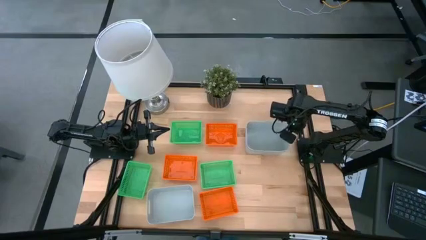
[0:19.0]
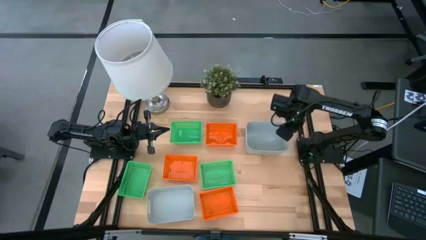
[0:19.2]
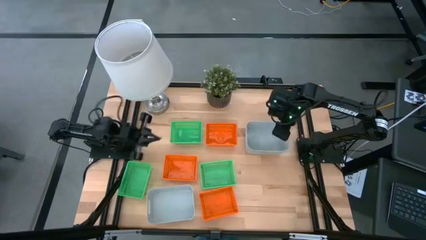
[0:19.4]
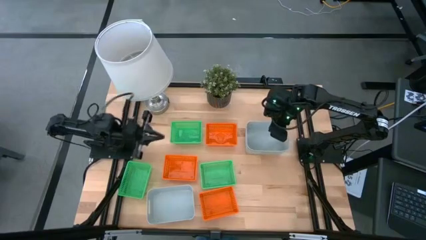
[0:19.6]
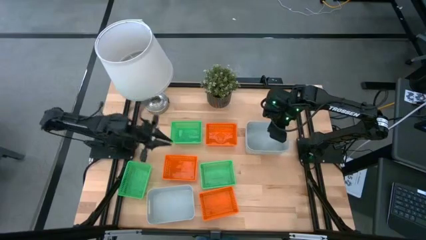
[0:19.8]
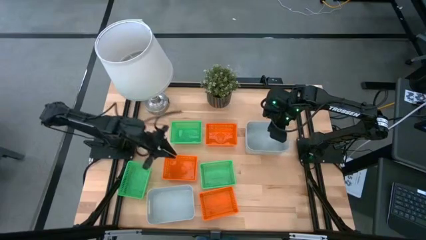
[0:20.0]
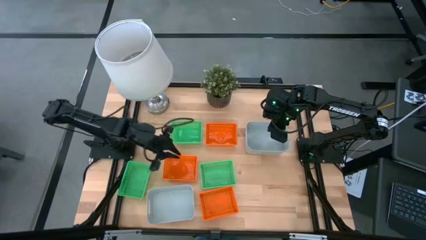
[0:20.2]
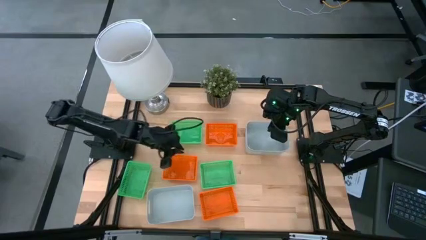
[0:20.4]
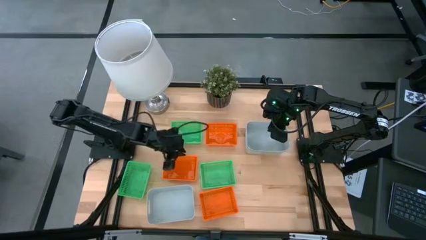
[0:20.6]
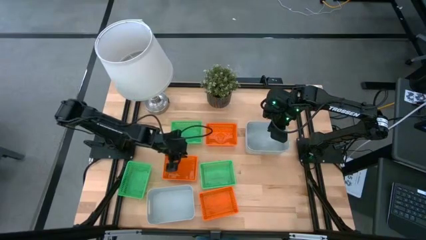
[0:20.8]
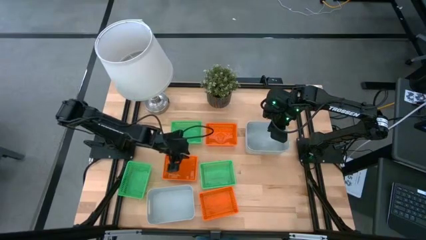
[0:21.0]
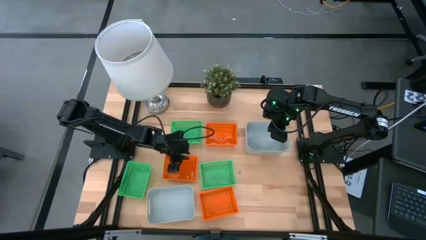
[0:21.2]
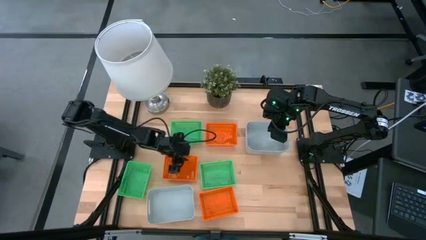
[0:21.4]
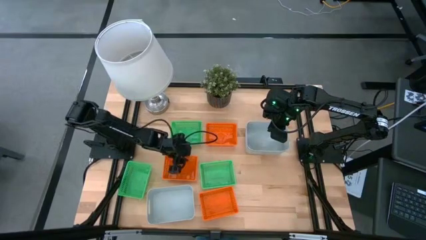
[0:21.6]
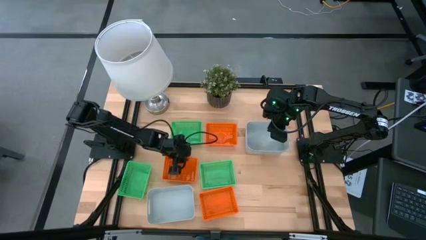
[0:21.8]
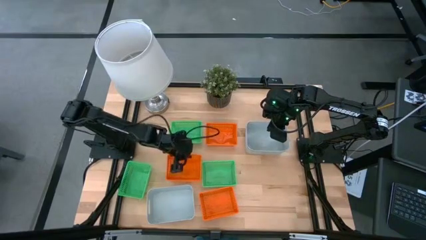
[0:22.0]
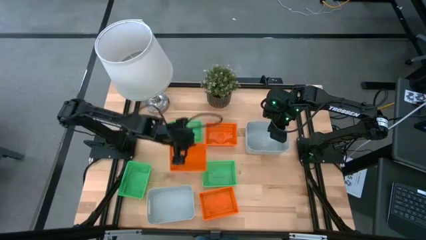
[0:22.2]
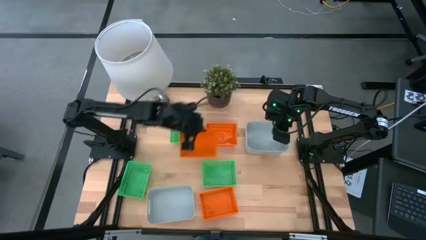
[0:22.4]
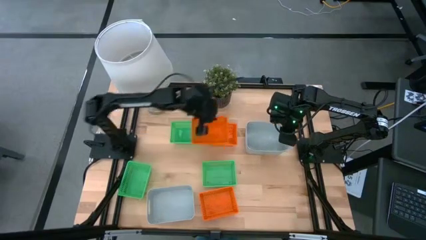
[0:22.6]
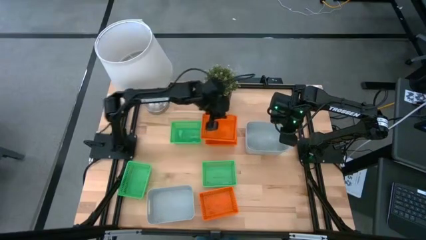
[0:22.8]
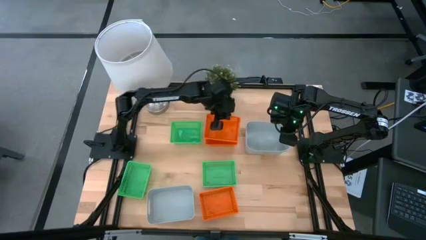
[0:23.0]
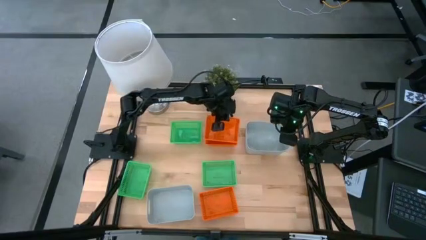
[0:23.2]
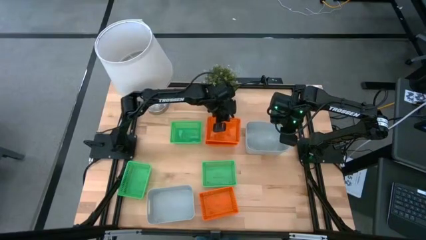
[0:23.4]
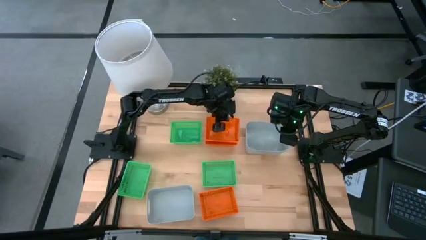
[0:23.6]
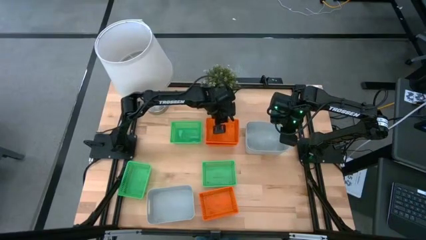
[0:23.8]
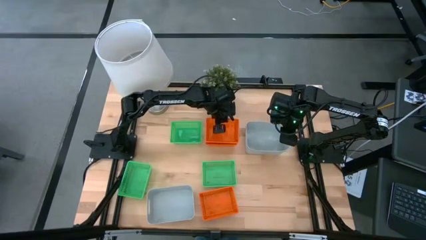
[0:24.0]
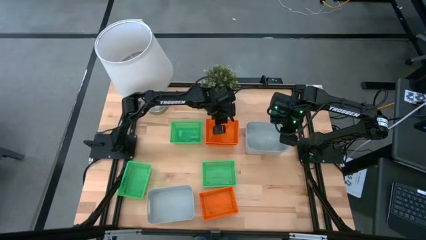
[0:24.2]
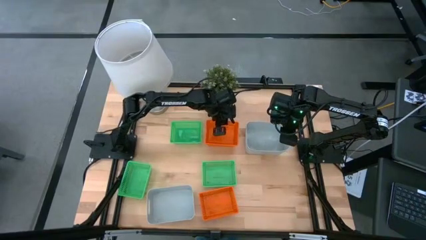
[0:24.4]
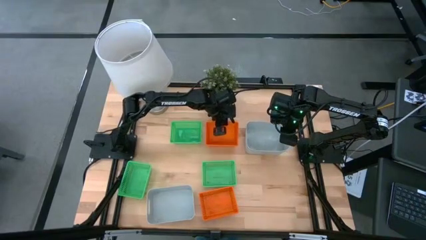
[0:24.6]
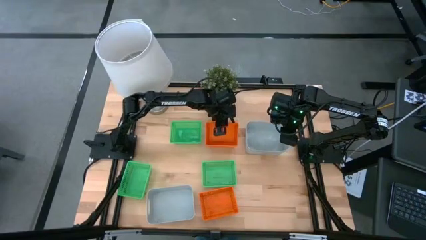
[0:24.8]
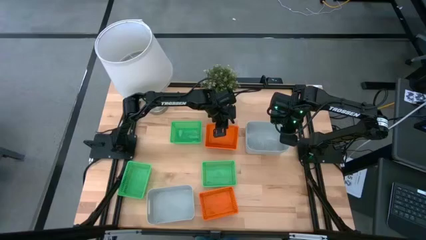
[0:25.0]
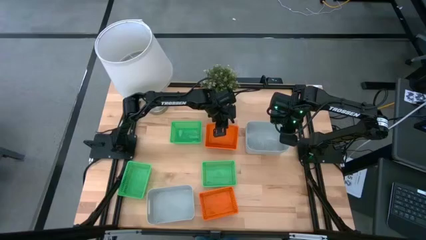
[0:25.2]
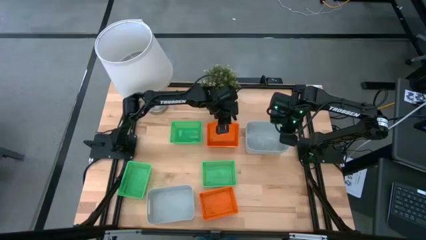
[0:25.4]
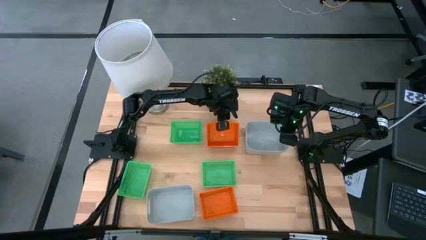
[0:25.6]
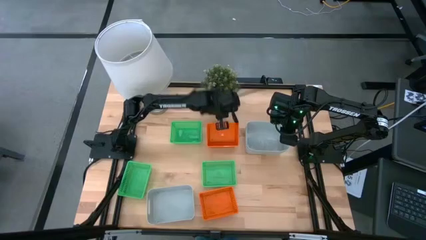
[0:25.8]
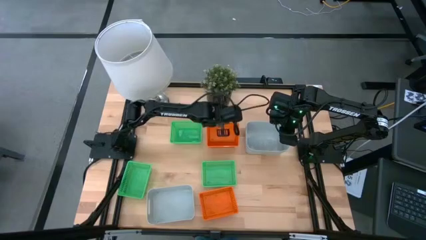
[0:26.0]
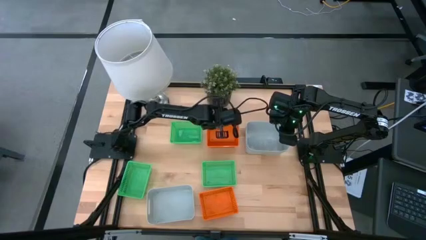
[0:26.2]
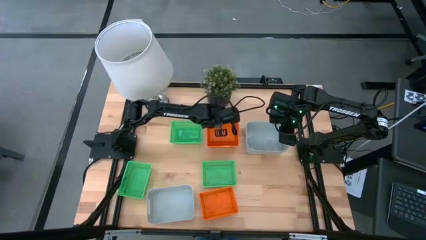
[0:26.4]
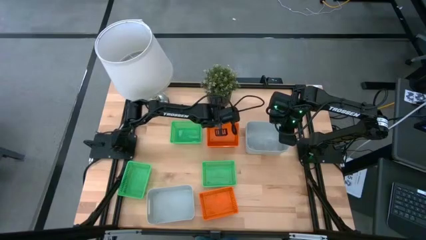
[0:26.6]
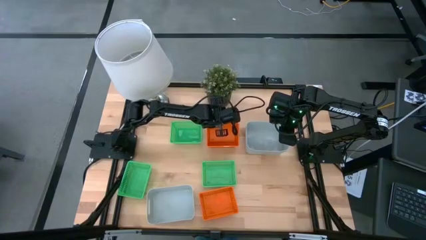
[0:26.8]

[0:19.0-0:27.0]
Stack the middle orange bin on the top of the orange bin

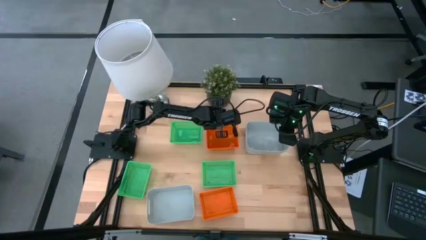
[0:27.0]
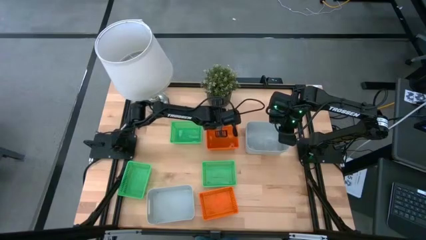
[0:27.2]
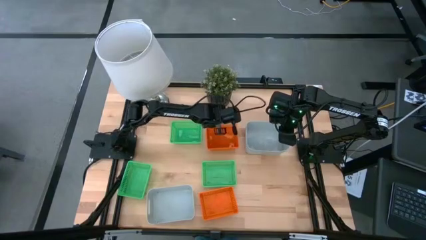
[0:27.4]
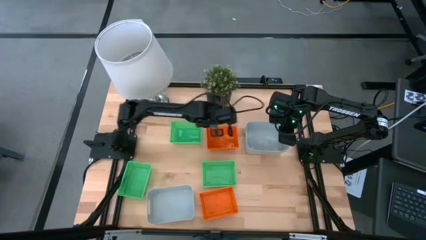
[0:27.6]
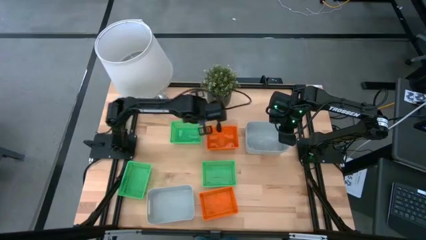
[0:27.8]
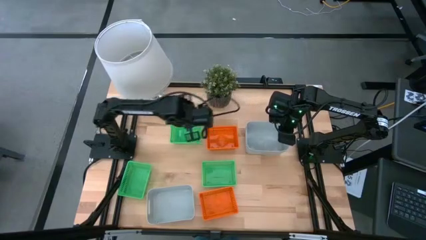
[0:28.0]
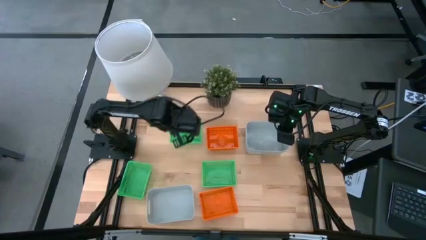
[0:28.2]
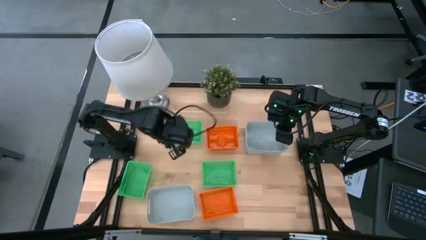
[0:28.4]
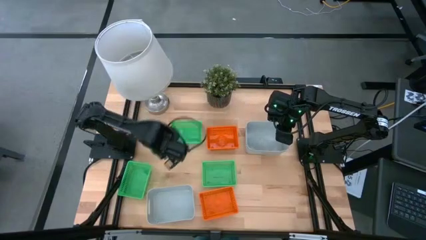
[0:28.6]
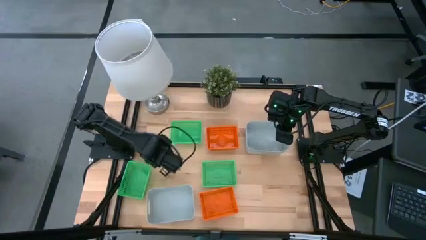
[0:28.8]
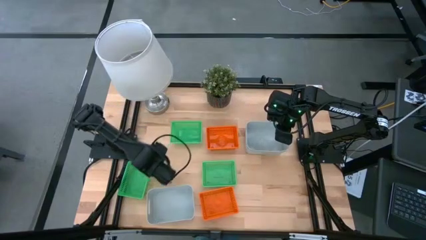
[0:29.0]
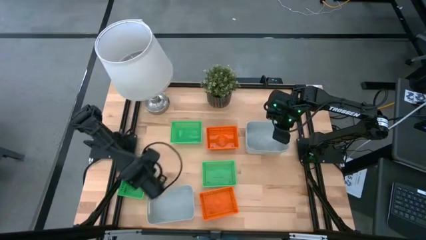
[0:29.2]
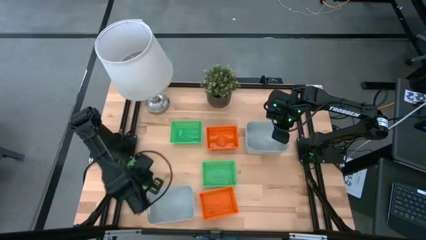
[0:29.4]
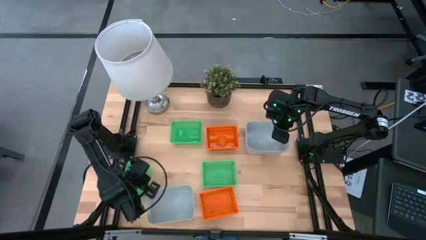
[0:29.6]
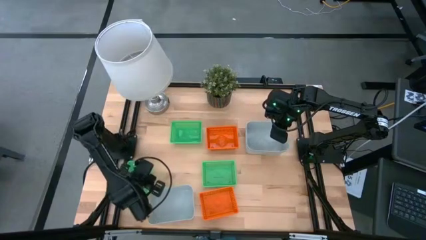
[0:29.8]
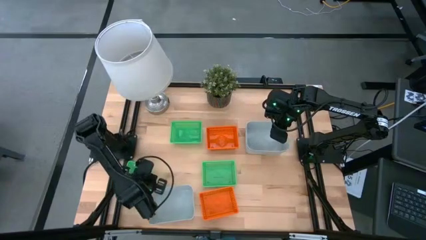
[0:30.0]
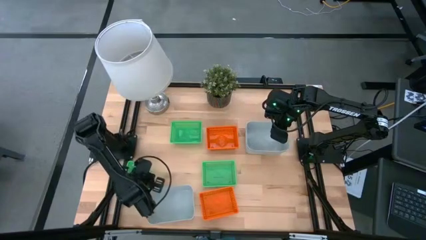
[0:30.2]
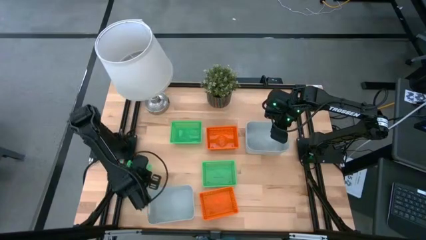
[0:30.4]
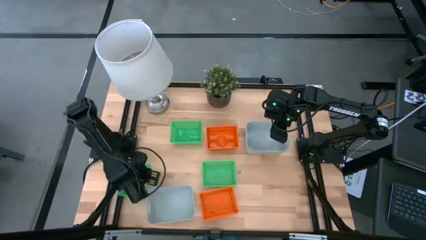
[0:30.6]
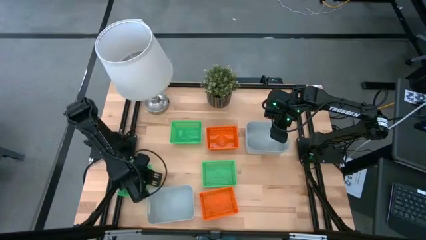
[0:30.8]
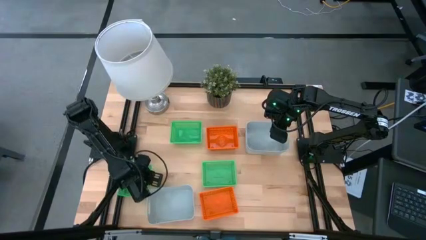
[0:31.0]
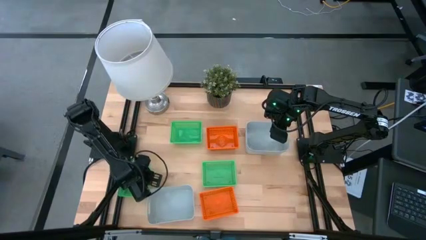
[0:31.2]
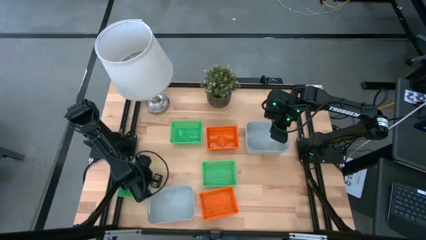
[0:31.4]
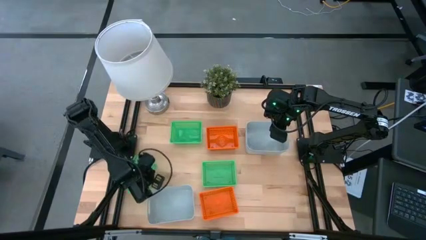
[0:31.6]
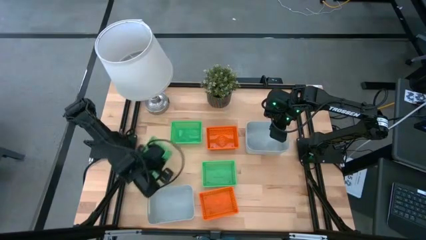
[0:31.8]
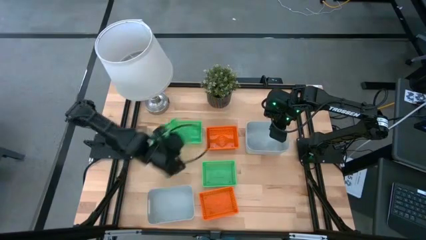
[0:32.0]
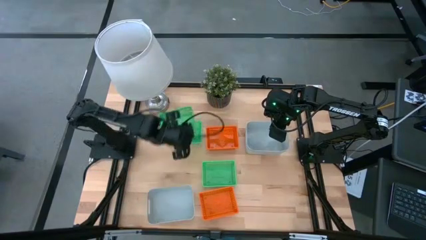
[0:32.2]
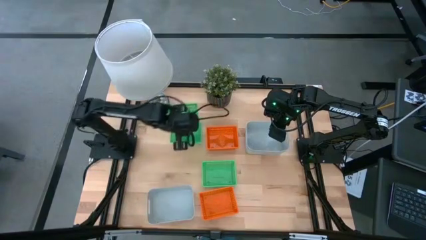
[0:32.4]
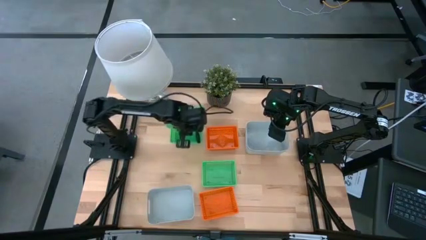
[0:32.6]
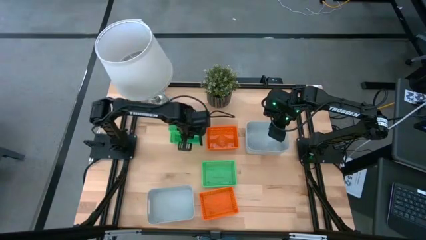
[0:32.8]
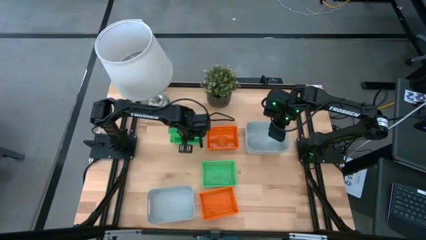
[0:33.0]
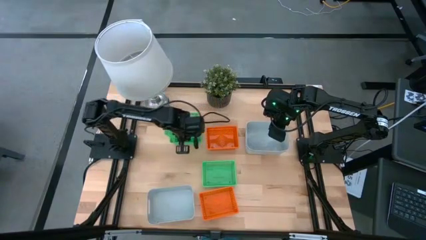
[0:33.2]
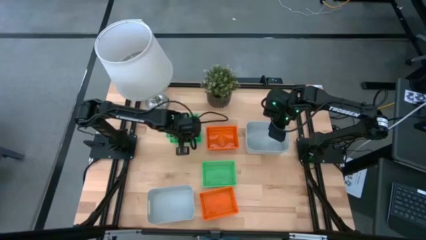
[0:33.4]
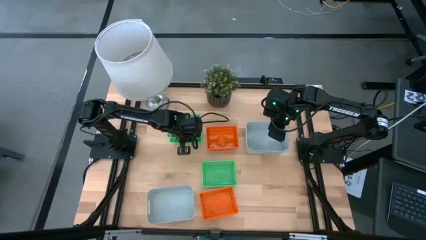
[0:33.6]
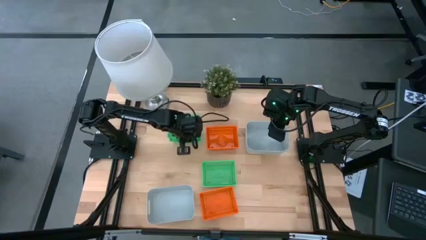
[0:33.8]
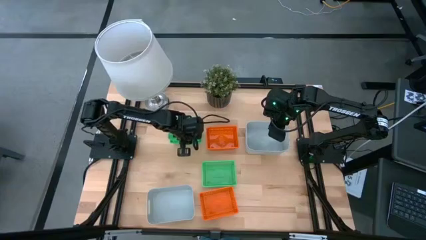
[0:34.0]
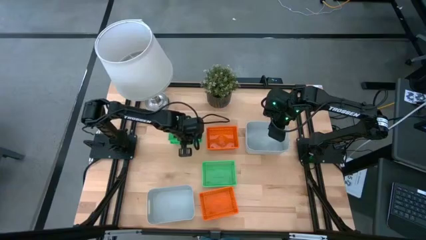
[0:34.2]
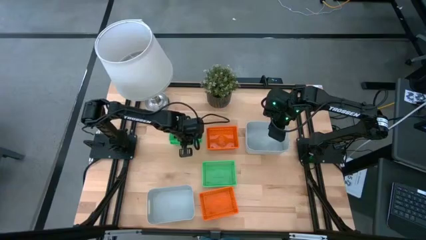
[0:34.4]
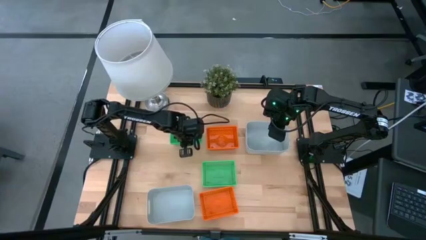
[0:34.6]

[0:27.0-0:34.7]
Stack the bottom left green bin on the top of the green bin
